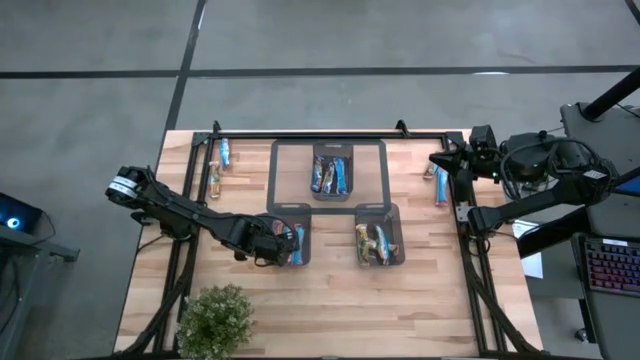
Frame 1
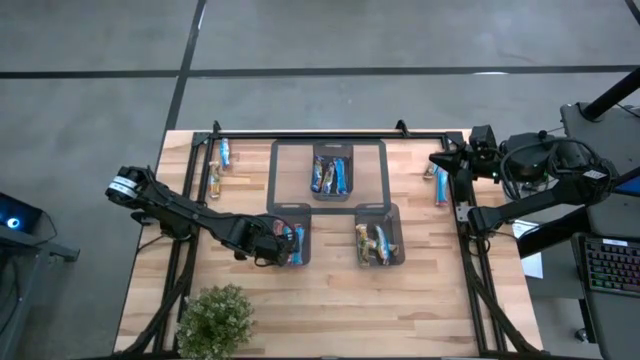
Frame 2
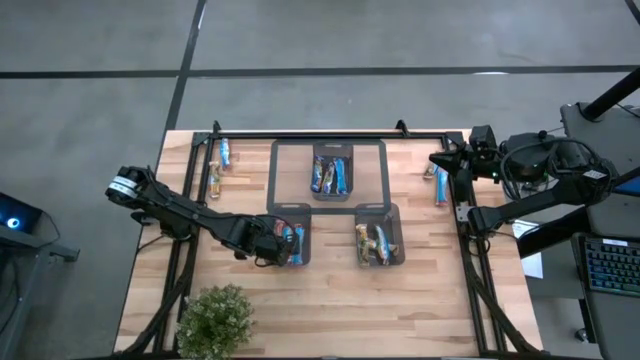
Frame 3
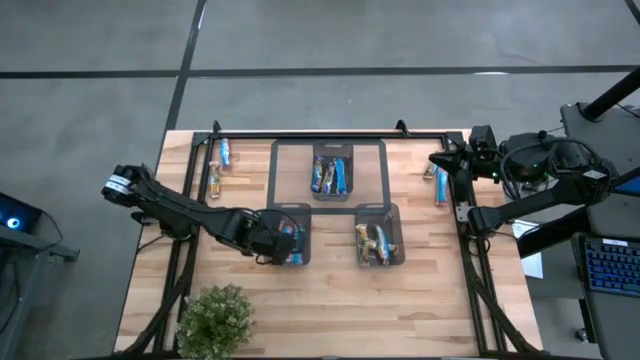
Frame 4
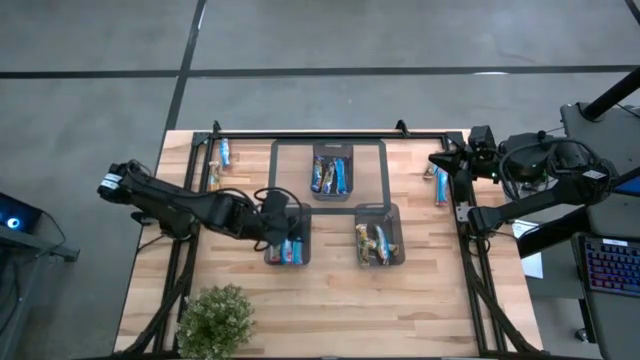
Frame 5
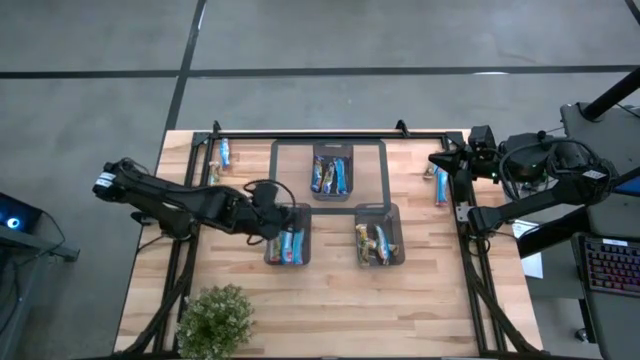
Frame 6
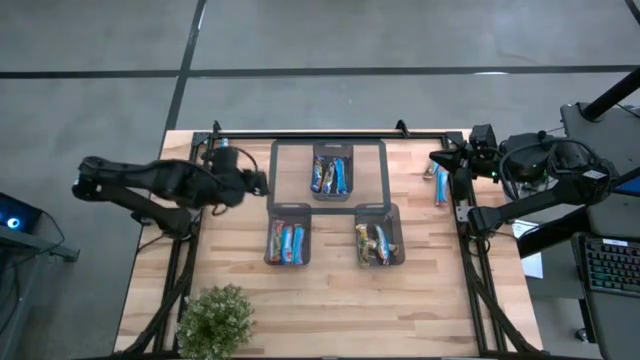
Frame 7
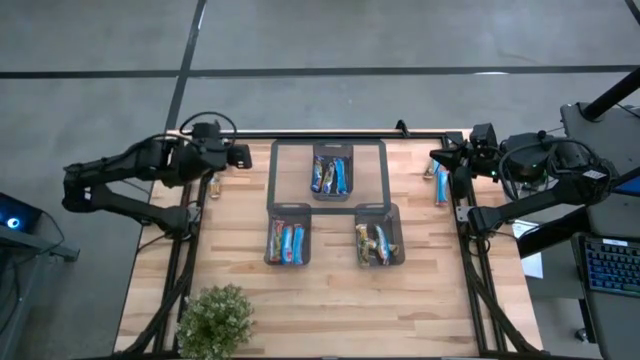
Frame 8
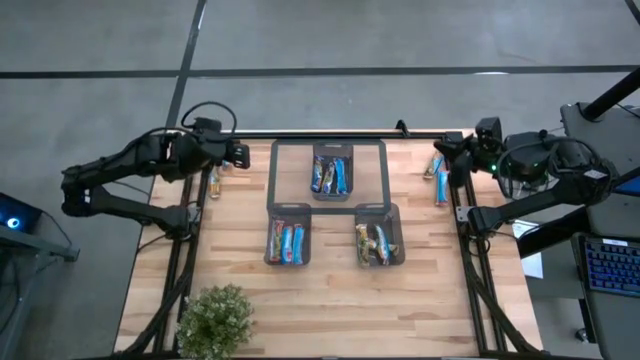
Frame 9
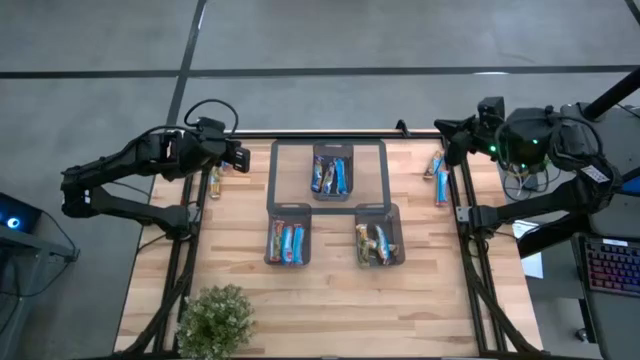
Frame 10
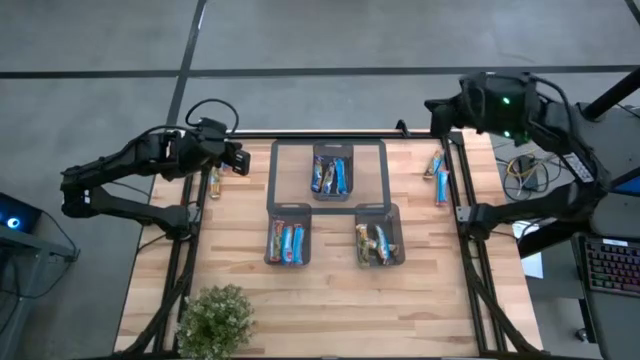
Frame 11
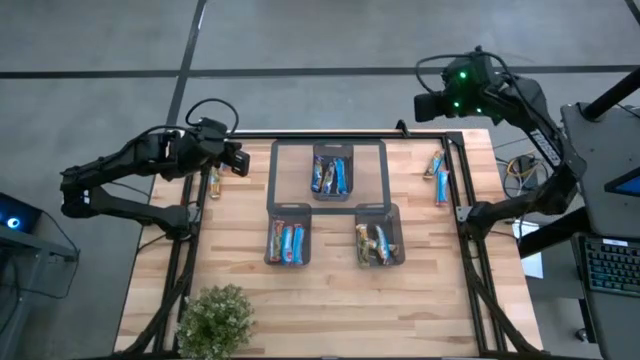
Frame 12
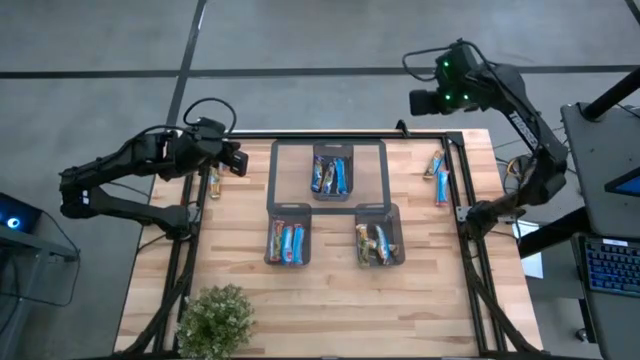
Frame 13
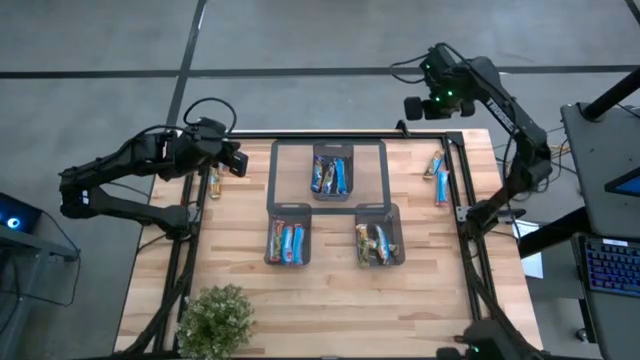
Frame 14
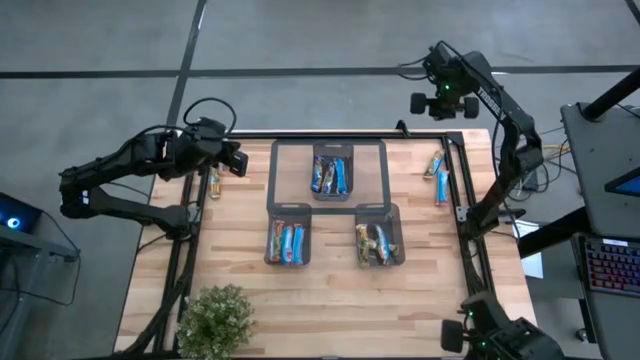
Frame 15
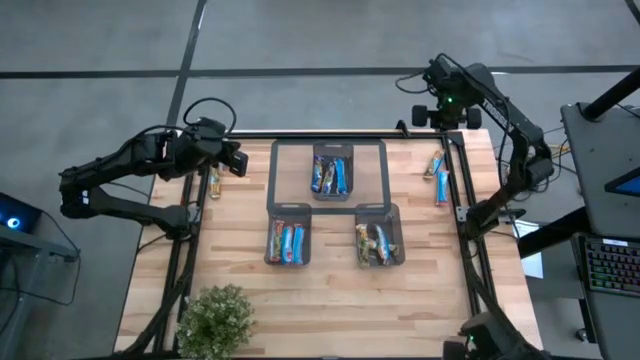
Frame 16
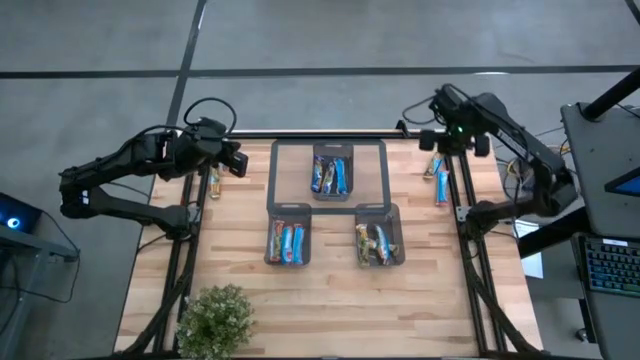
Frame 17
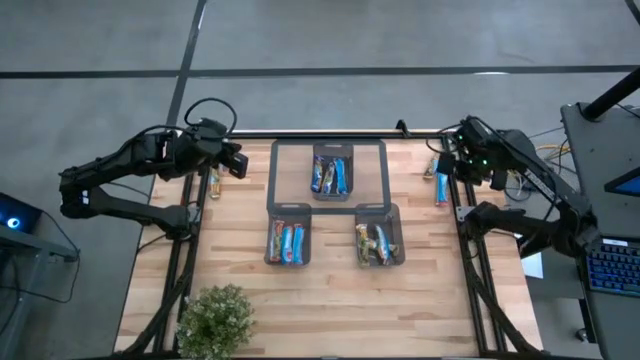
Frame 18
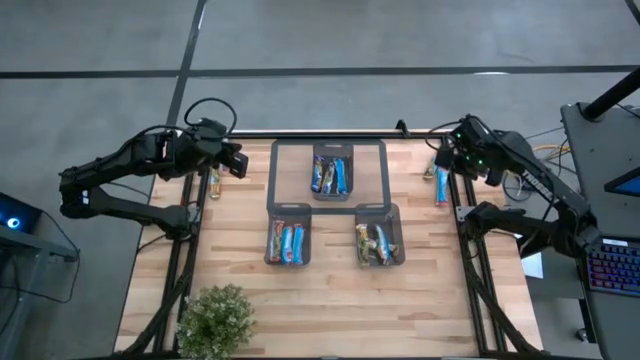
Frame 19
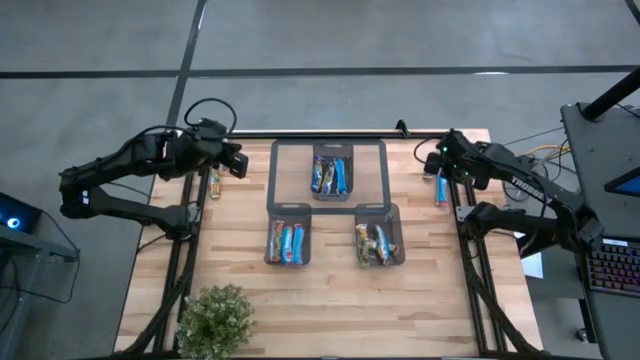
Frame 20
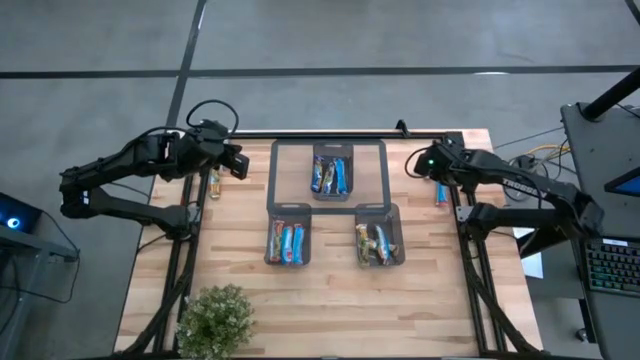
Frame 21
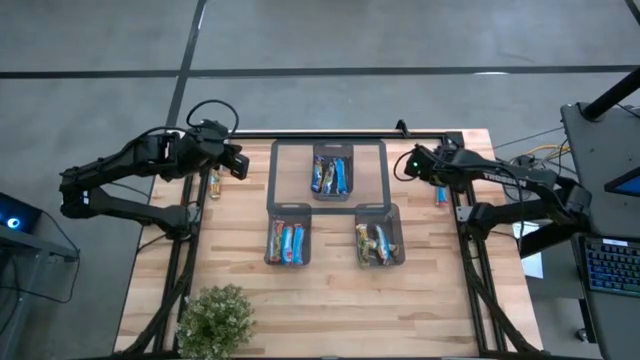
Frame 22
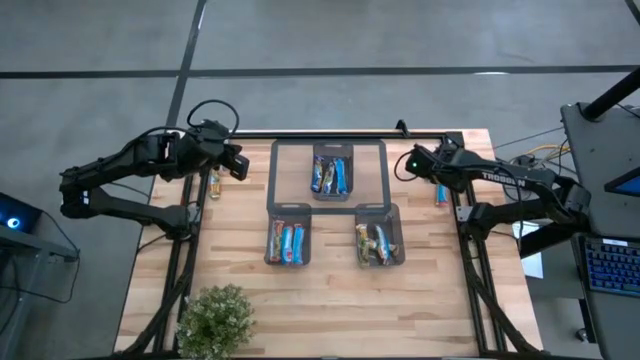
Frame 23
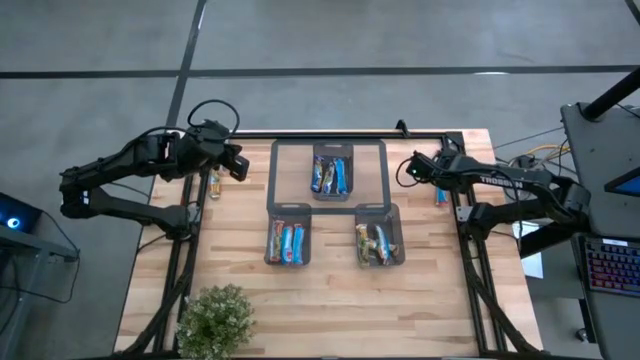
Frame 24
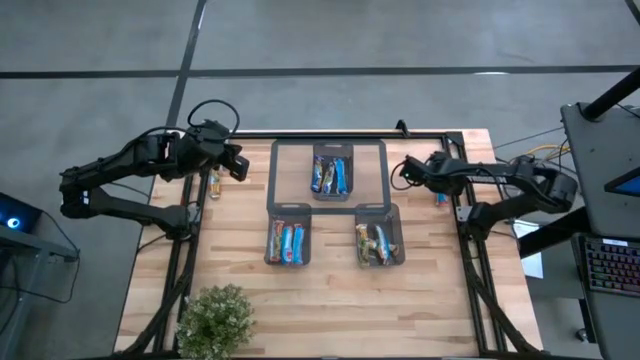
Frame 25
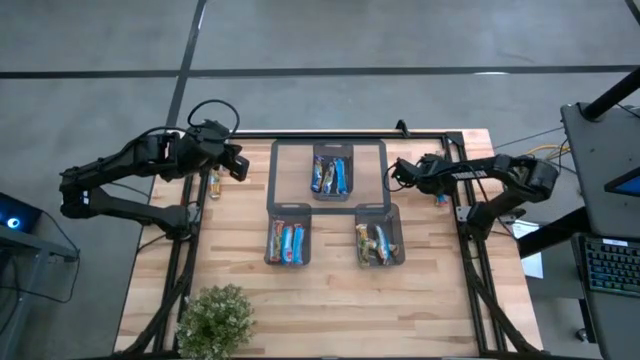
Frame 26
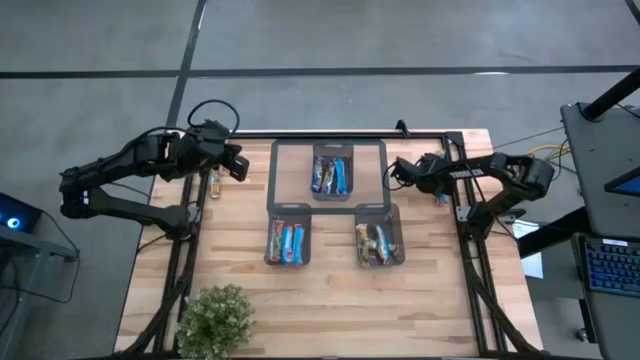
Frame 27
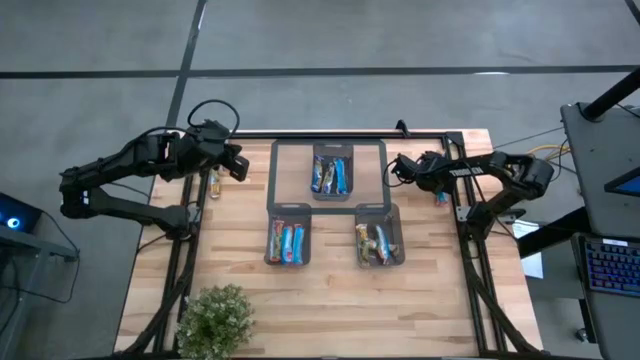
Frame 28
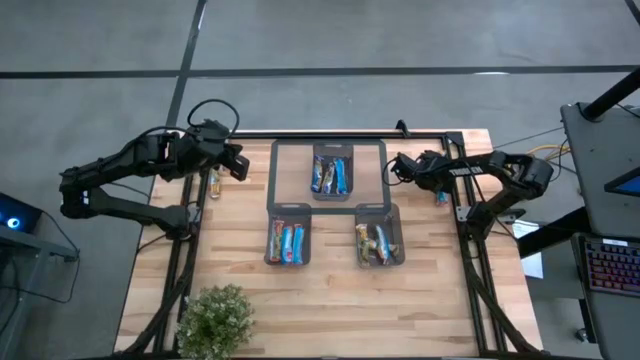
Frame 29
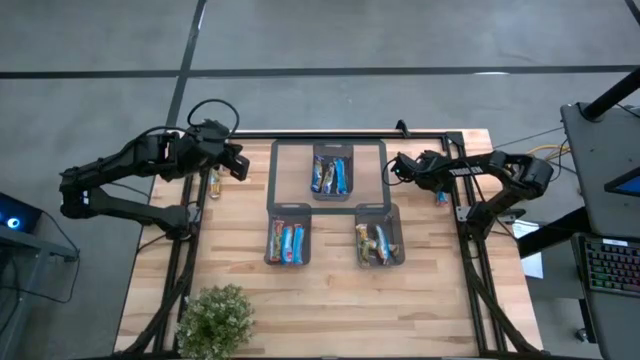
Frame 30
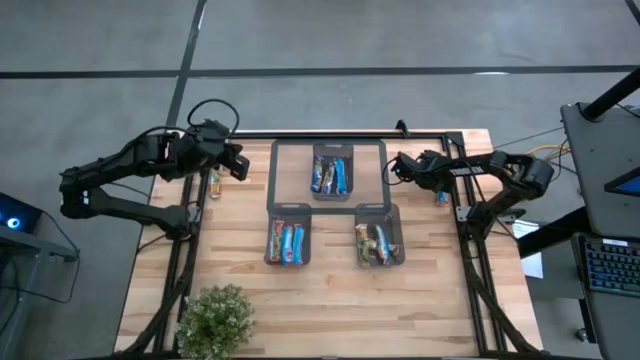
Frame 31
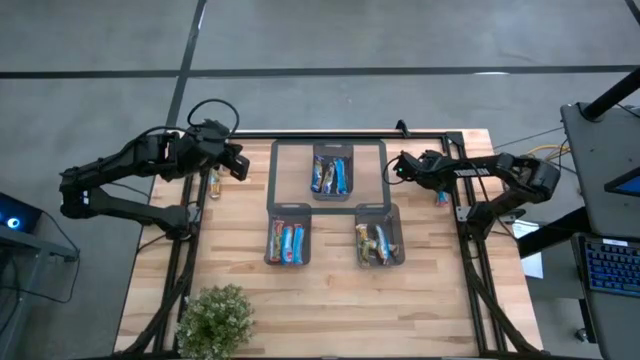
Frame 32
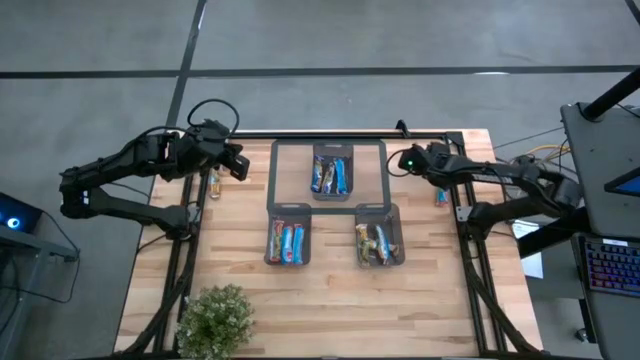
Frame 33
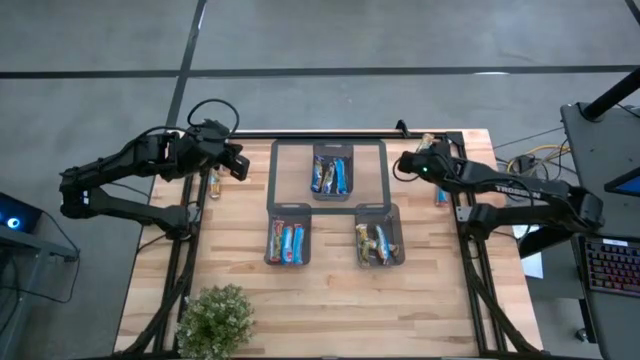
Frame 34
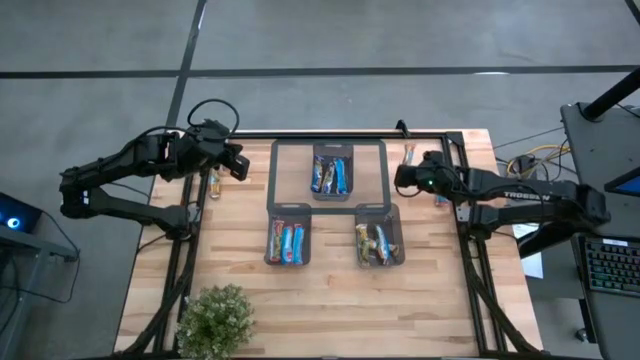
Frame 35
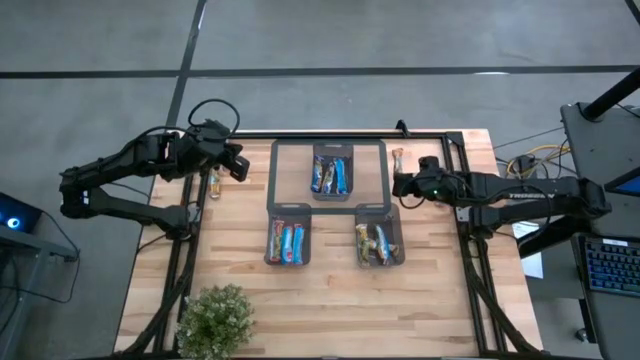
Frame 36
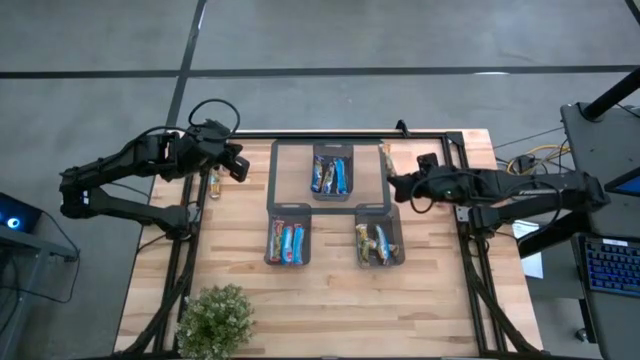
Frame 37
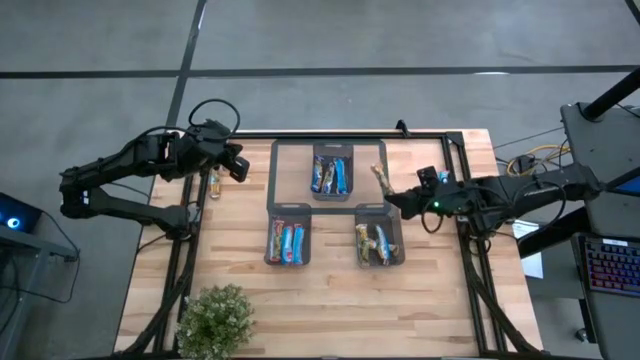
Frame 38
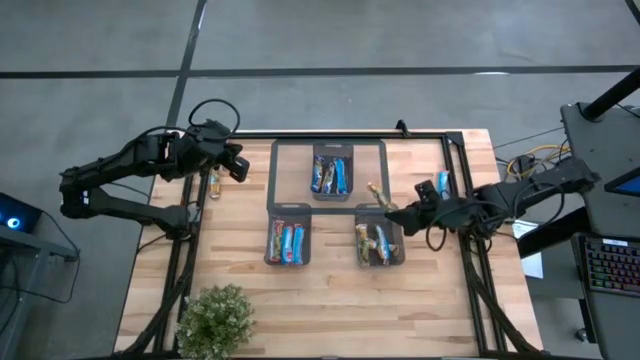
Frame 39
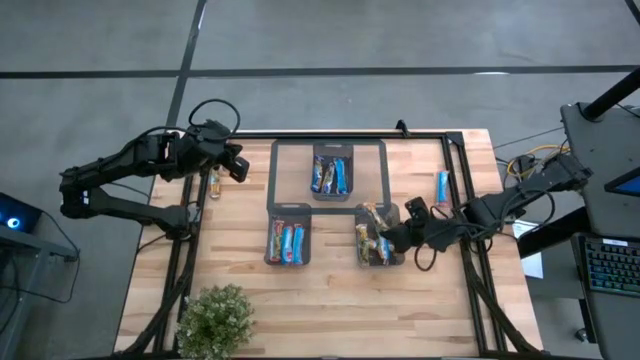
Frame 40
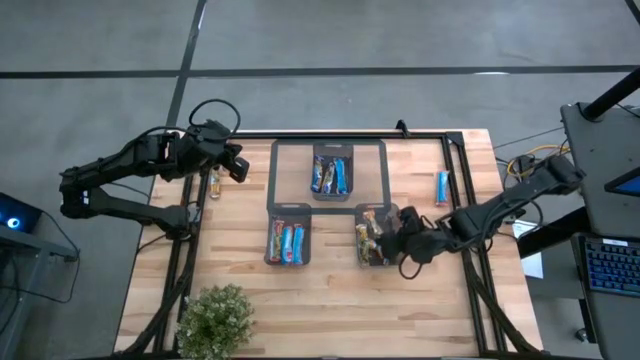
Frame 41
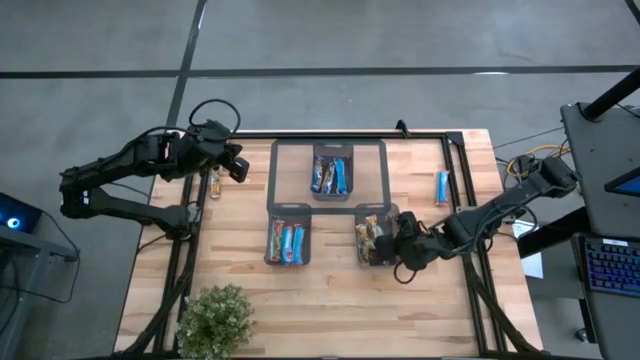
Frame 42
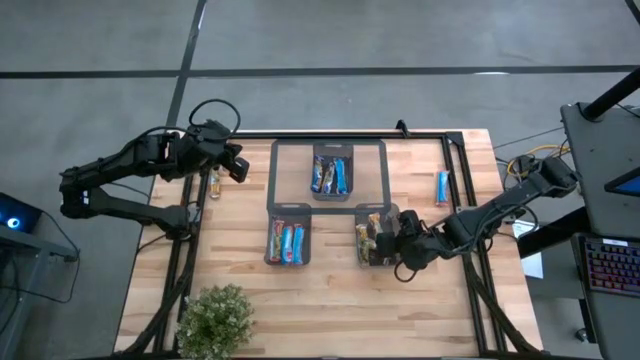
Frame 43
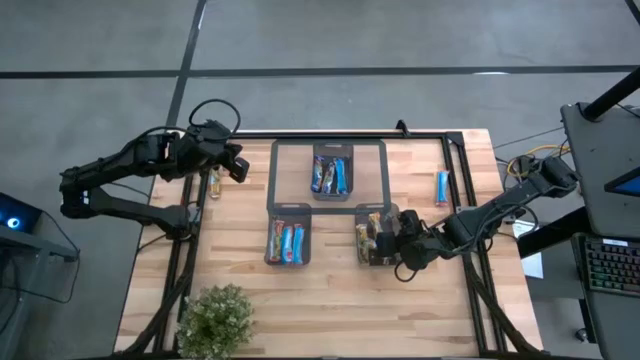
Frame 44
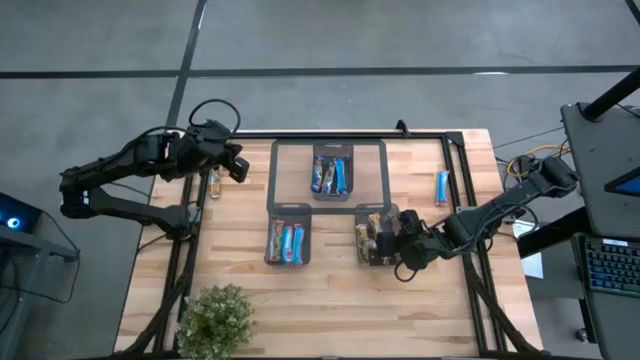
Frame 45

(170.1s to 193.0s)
Task: Pick and place Granola Bars by type
Put the orange granola bar into the bottom right black bin
